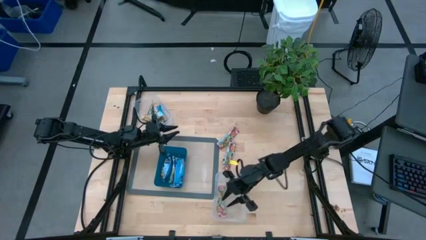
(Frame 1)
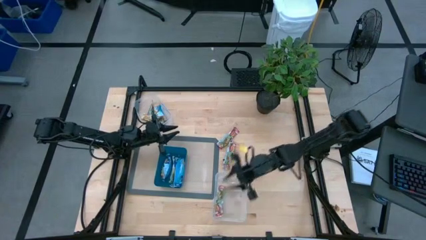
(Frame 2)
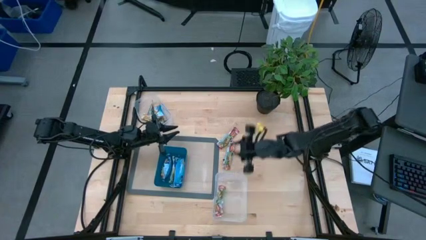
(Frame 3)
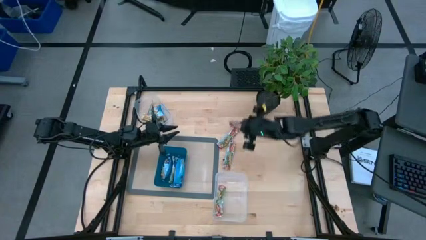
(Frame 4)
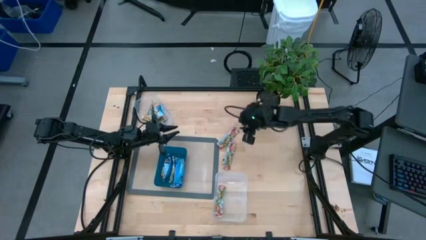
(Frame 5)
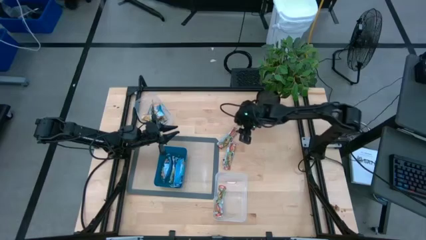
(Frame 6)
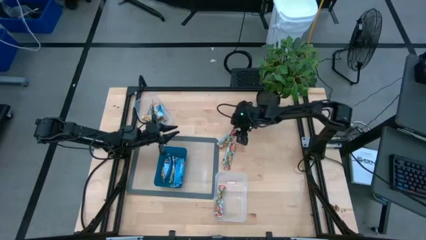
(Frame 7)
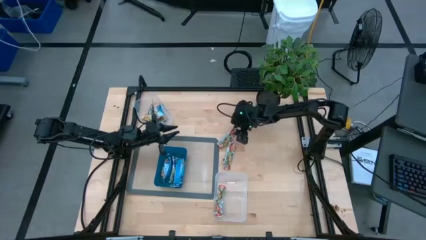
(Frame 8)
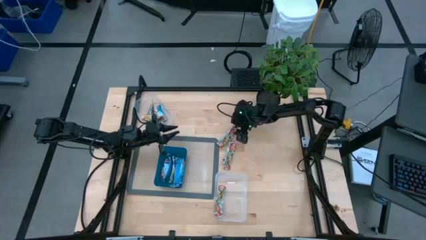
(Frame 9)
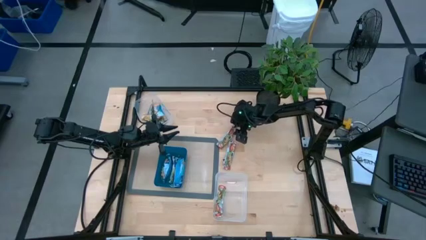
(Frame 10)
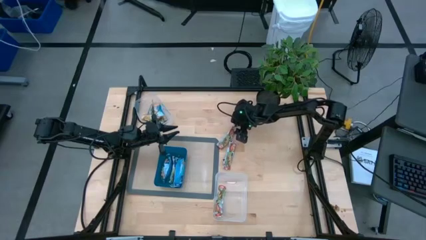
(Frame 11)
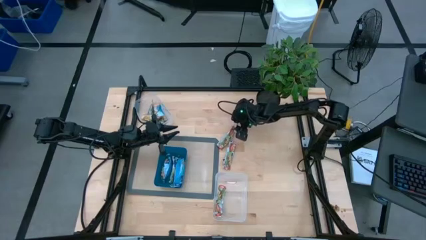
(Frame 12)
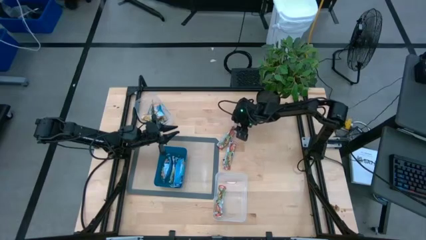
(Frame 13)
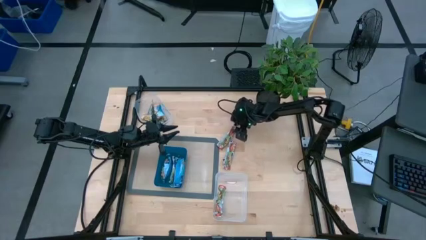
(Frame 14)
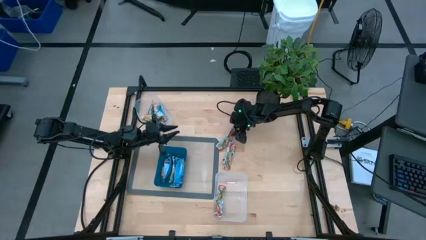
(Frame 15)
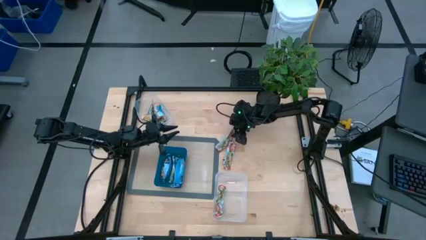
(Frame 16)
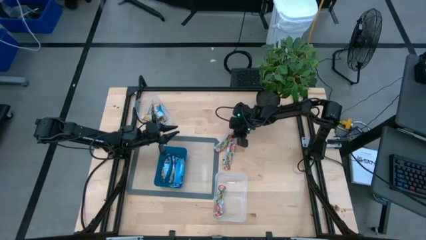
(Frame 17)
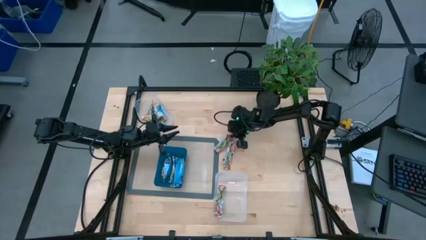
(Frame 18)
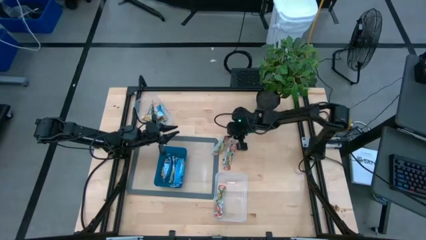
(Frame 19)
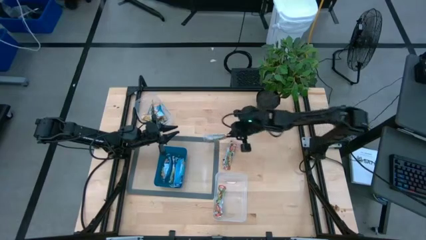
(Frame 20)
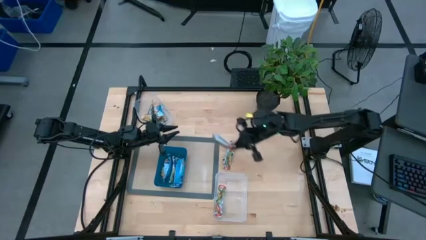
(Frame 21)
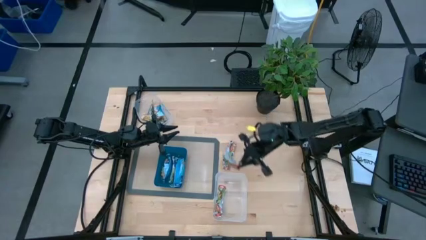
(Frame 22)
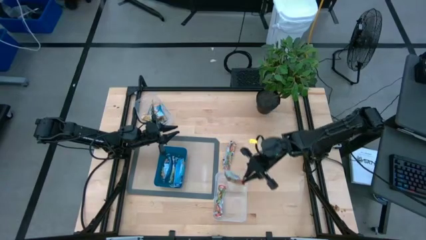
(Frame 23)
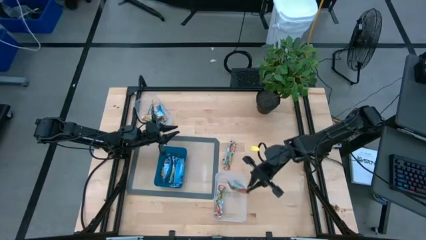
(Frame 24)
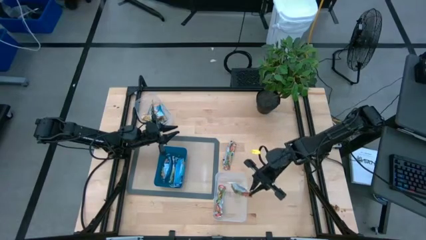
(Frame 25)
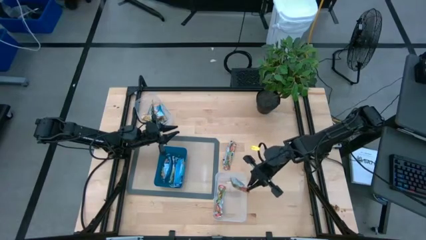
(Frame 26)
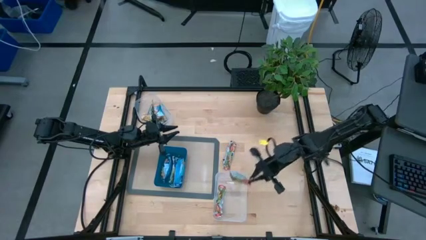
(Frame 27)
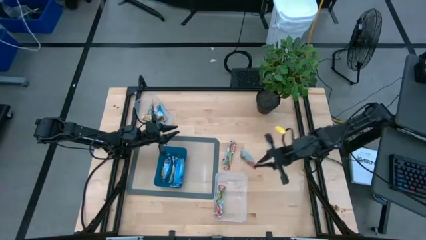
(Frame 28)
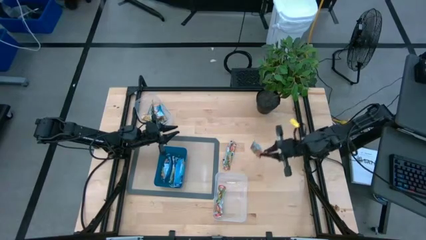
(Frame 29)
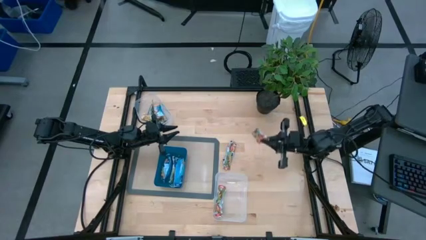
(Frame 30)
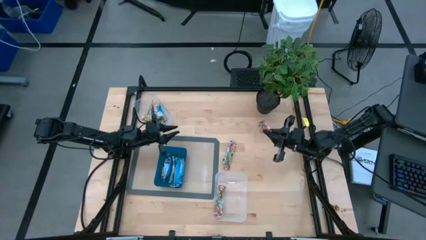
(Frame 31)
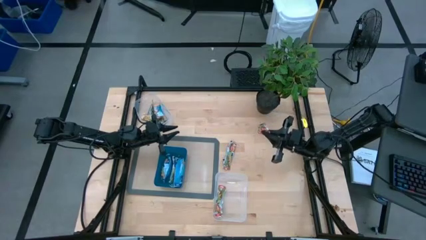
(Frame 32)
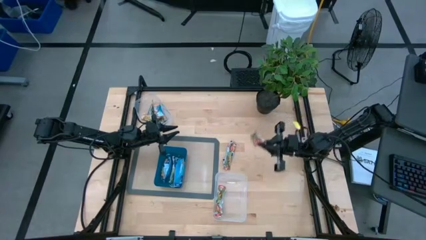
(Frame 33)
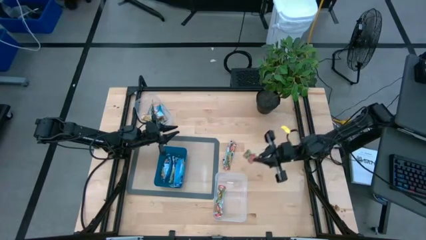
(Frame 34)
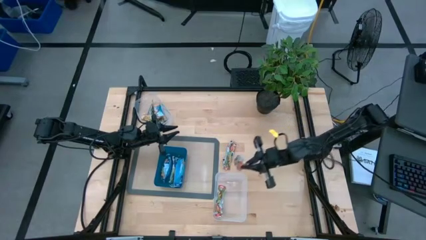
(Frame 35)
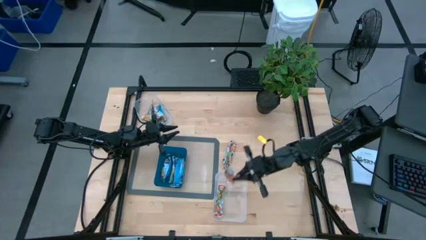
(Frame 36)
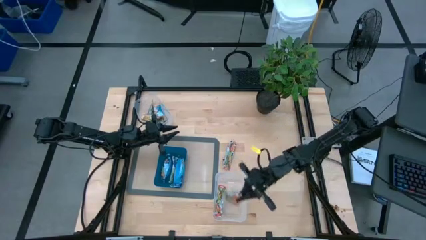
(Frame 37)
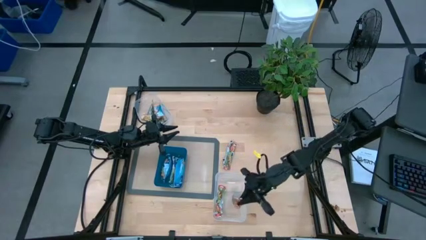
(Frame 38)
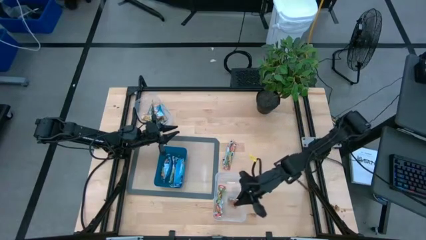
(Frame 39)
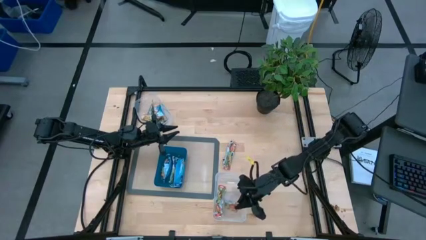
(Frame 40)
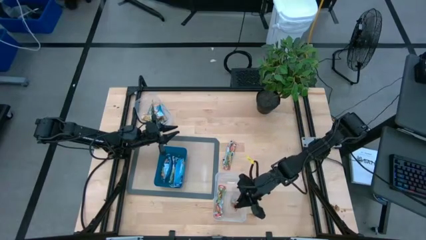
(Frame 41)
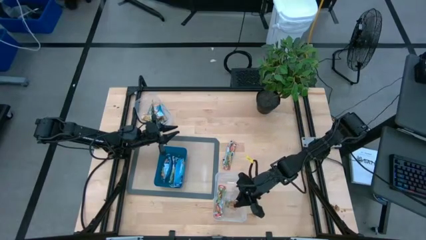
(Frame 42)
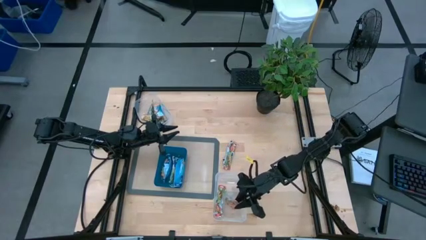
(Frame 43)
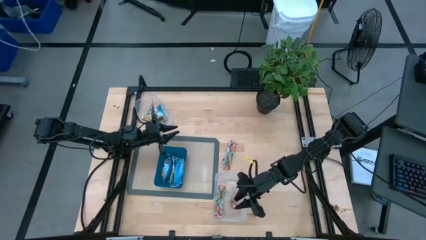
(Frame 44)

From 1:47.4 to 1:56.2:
Task: Pick and place Granola Bars by type
Put the top red granola bar into the bottom transparent bin

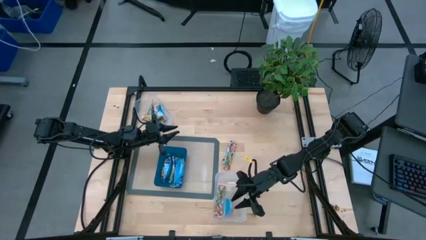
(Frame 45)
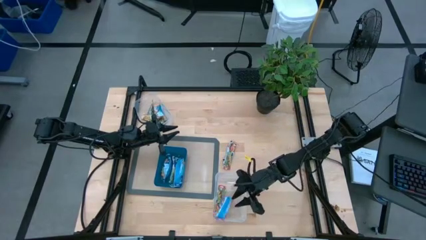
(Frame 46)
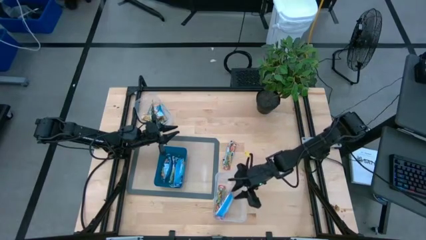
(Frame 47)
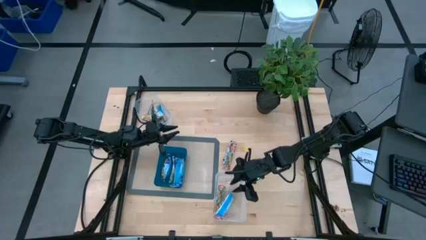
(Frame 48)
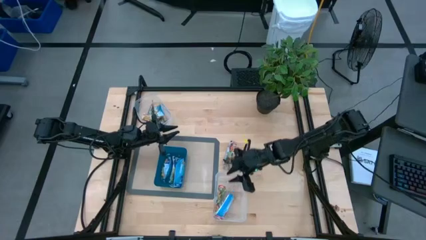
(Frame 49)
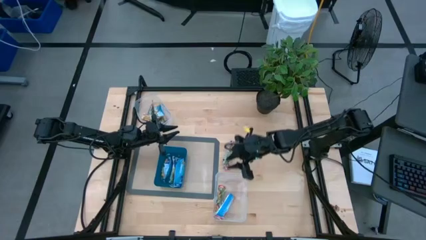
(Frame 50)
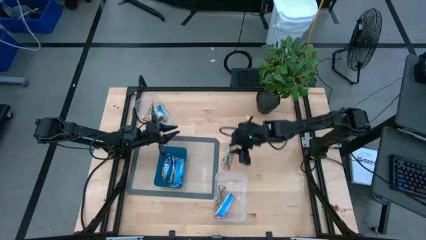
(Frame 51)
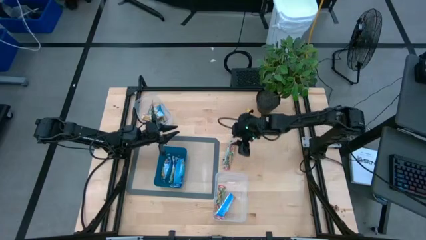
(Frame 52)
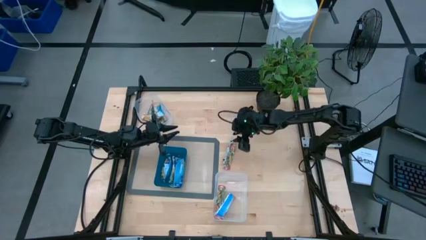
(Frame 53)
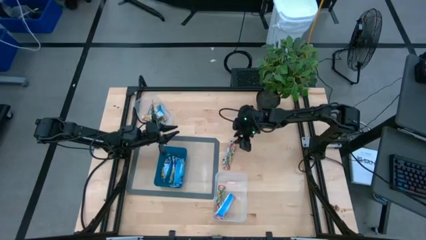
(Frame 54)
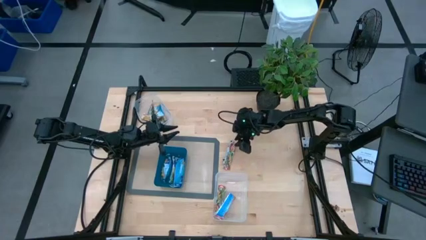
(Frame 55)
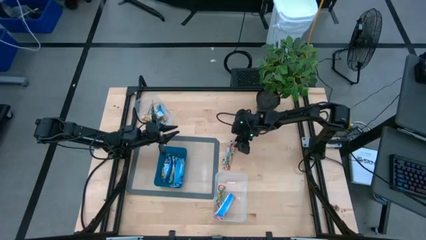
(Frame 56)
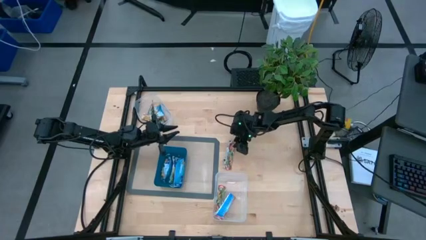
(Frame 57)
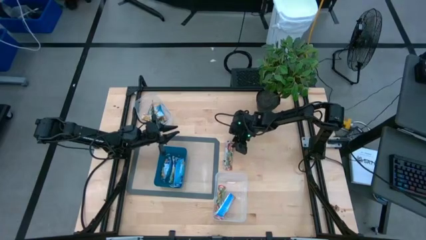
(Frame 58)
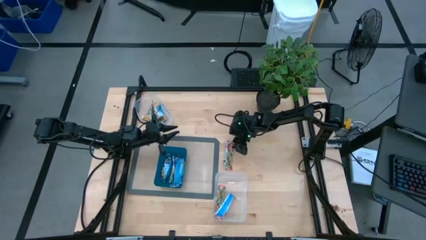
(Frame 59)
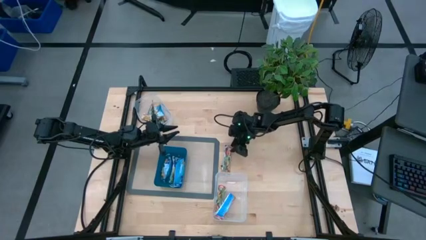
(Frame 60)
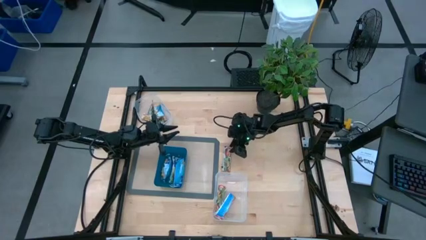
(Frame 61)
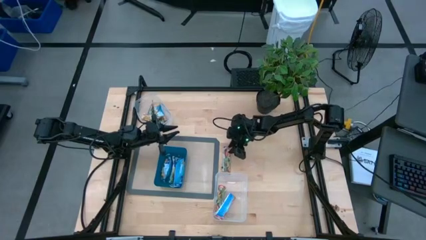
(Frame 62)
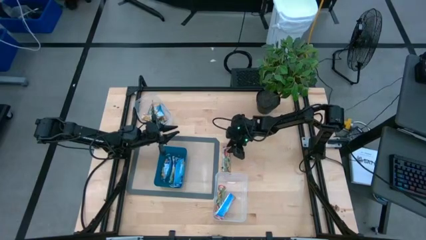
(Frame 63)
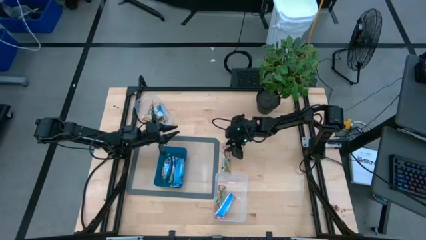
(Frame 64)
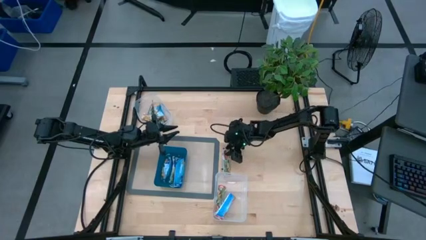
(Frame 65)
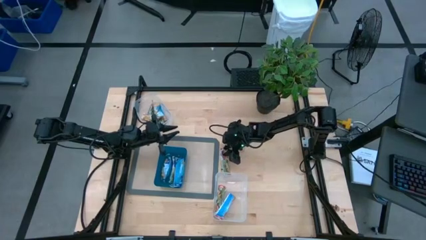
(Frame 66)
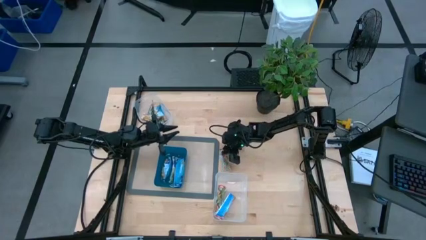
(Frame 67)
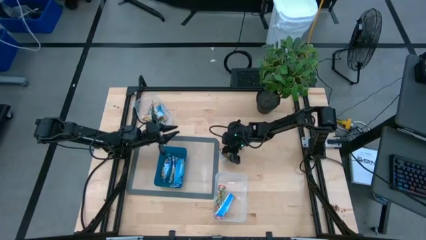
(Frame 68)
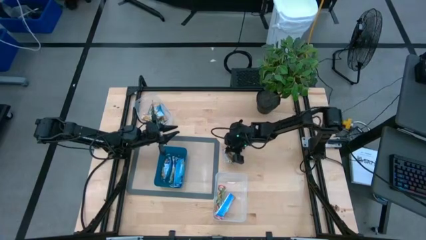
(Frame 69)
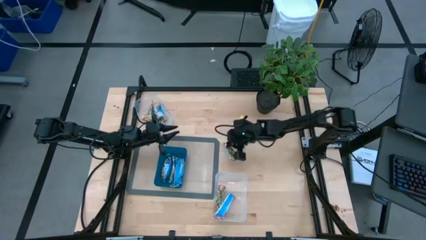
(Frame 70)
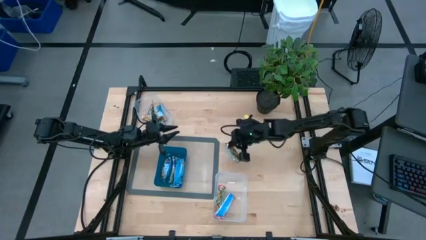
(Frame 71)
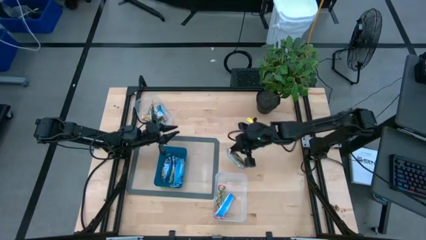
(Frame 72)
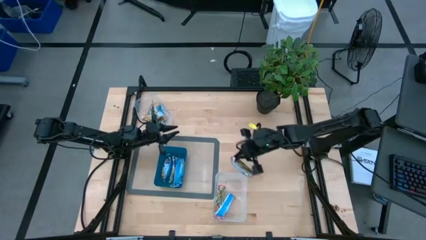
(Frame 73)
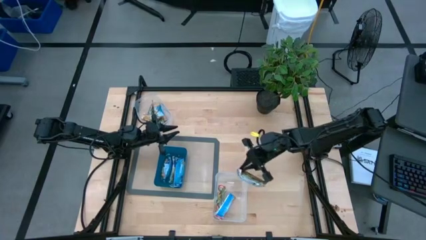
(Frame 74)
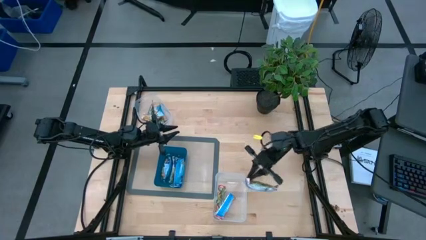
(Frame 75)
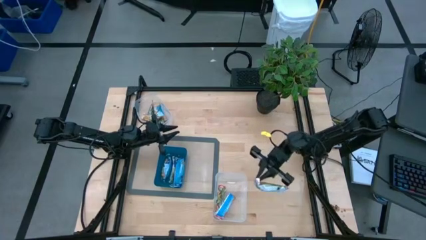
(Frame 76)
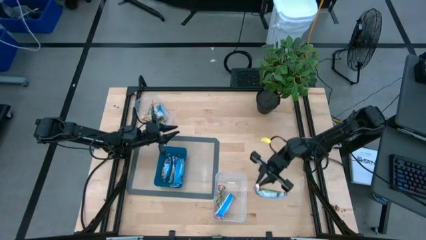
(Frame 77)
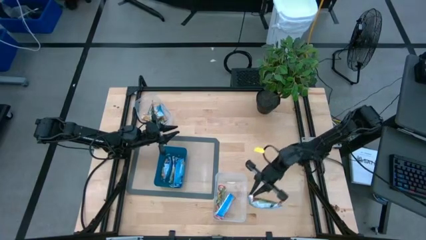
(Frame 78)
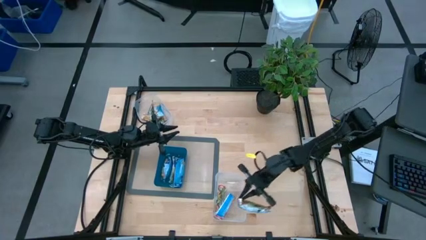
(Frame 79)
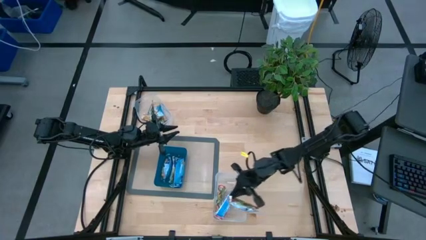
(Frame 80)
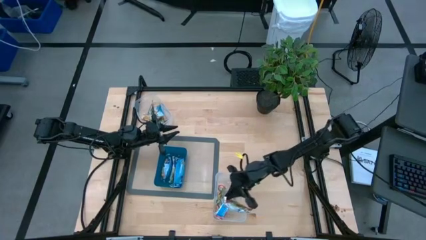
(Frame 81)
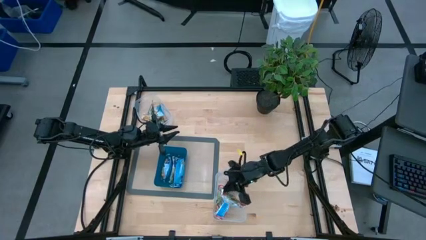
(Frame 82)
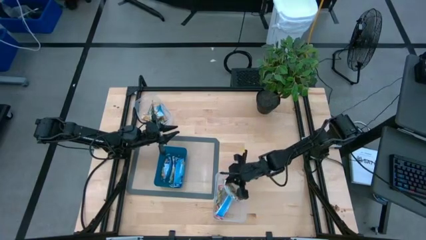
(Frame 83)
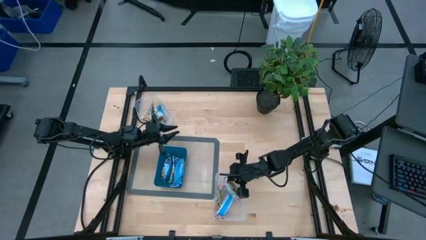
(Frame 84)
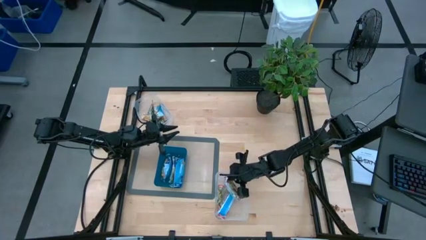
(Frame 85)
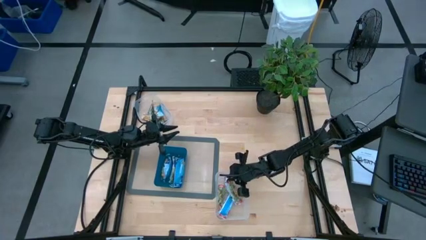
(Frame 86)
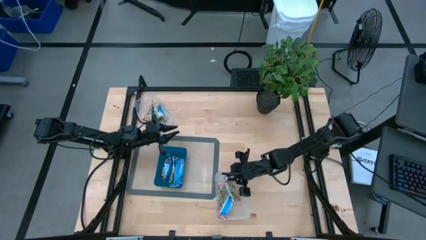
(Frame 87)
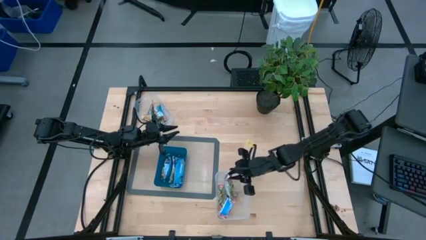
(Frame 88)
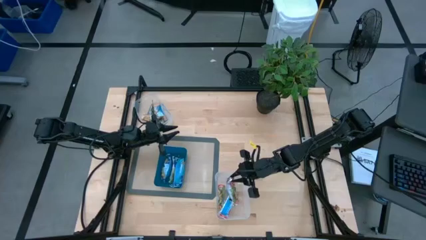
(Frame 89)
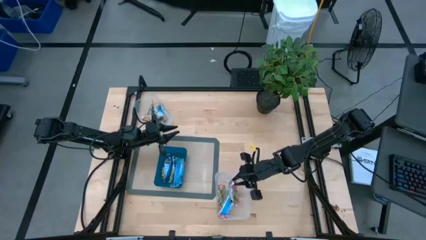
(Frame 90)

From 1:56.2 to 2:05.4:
Put the red granola bar into the bottom transparent bin
